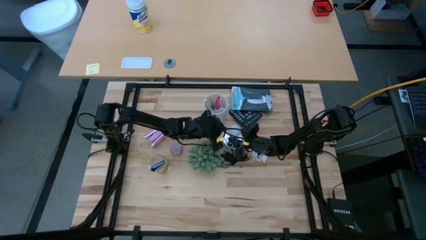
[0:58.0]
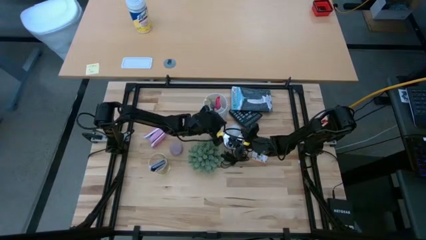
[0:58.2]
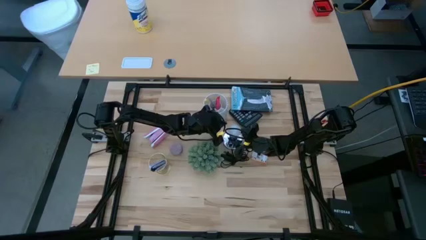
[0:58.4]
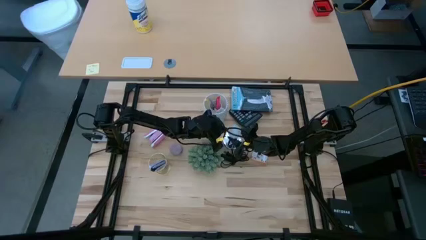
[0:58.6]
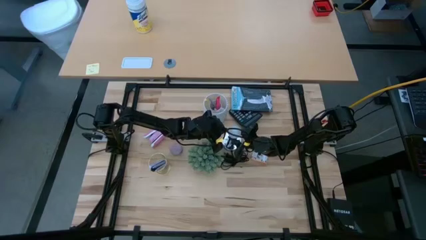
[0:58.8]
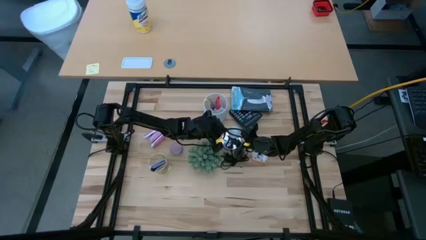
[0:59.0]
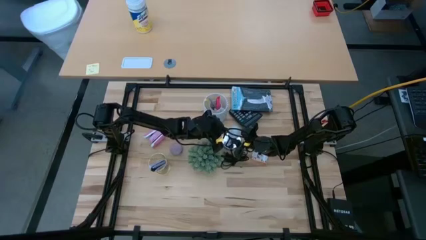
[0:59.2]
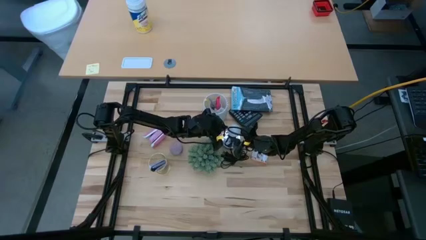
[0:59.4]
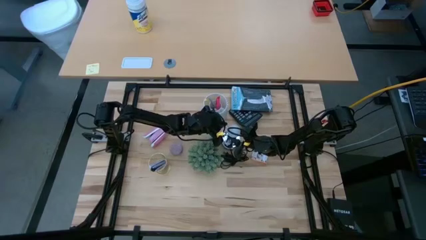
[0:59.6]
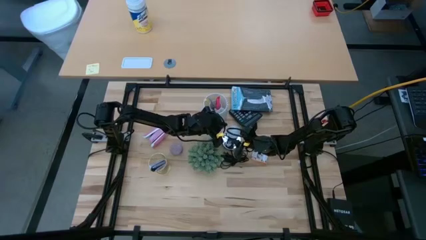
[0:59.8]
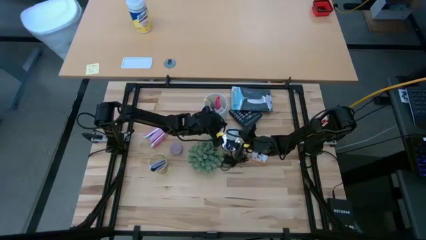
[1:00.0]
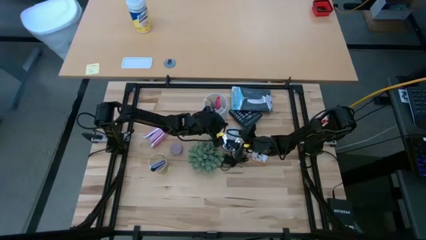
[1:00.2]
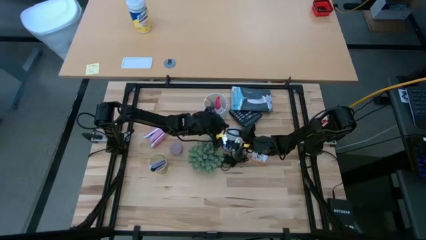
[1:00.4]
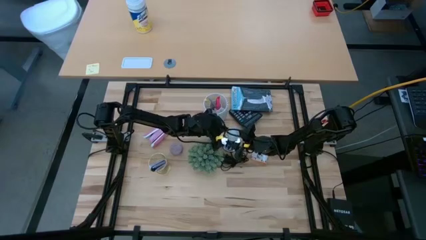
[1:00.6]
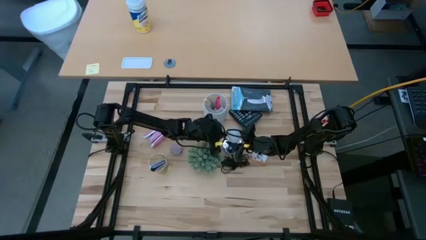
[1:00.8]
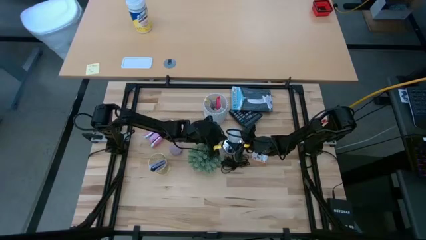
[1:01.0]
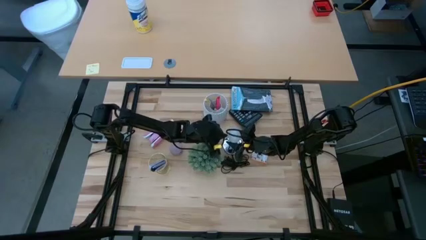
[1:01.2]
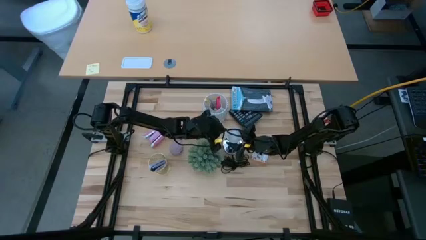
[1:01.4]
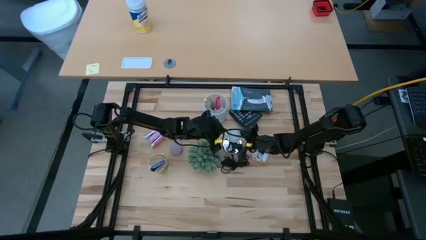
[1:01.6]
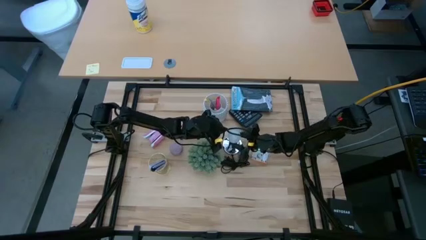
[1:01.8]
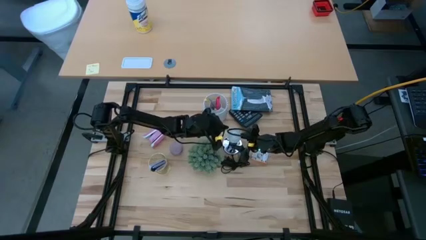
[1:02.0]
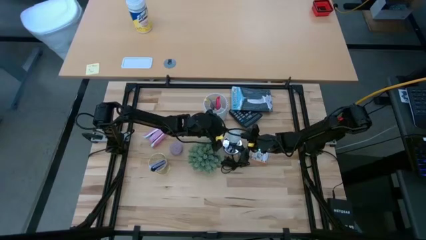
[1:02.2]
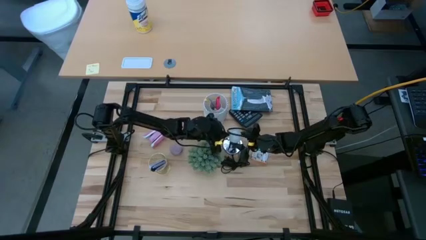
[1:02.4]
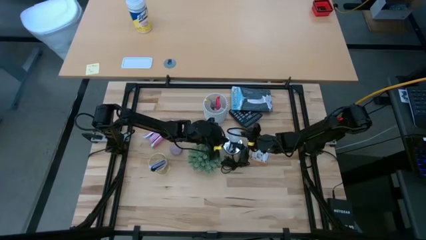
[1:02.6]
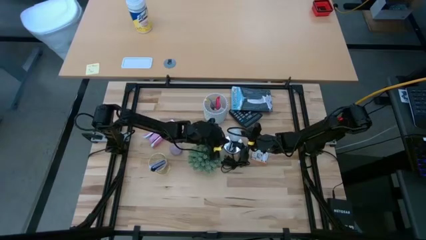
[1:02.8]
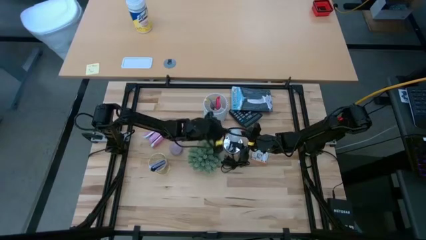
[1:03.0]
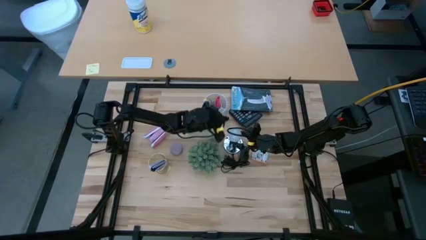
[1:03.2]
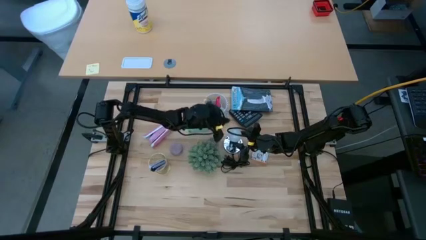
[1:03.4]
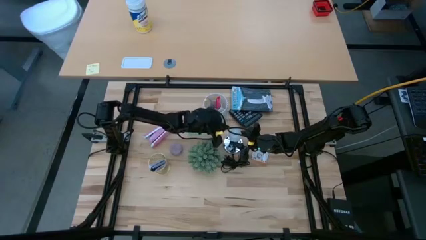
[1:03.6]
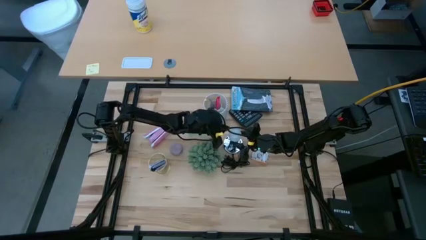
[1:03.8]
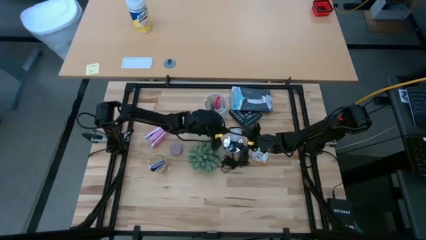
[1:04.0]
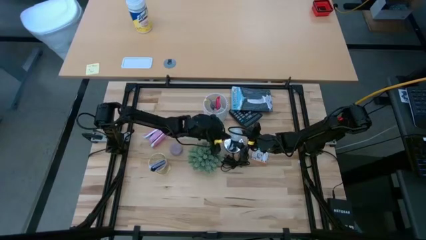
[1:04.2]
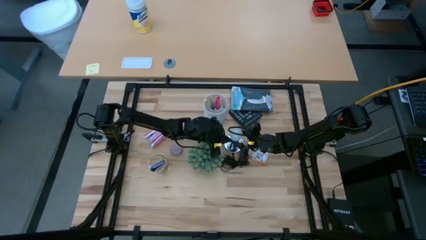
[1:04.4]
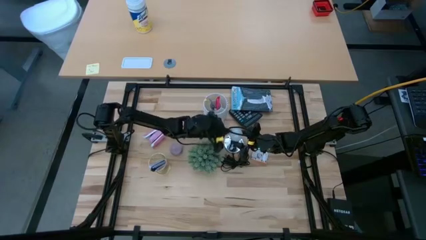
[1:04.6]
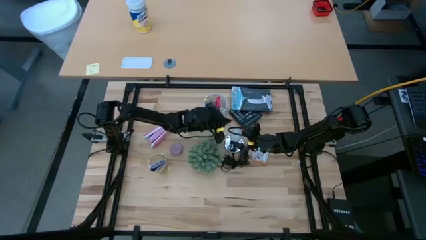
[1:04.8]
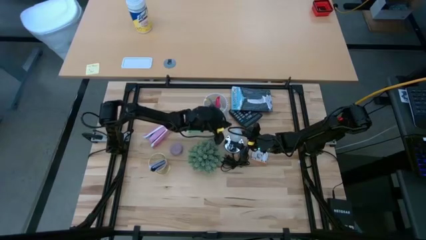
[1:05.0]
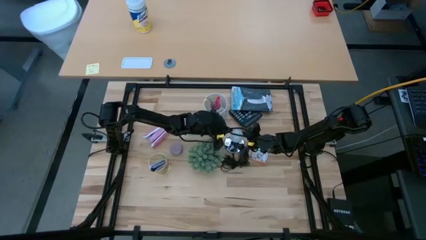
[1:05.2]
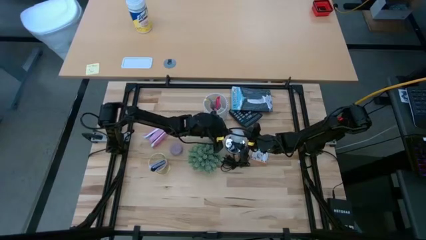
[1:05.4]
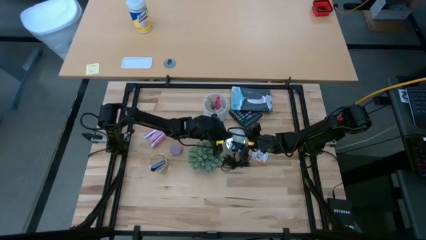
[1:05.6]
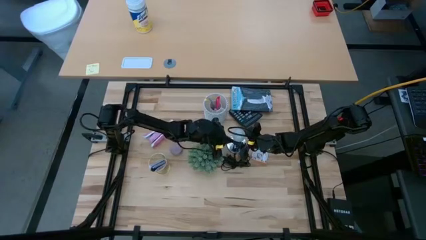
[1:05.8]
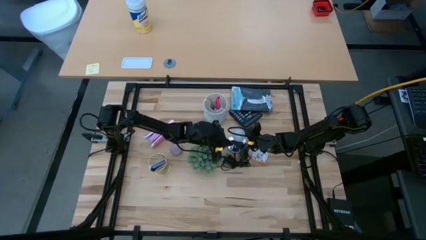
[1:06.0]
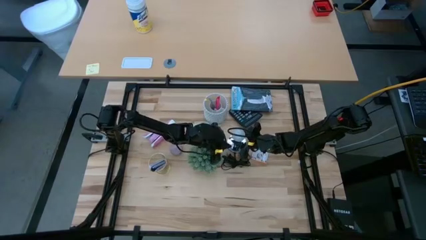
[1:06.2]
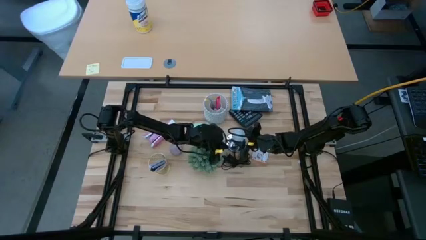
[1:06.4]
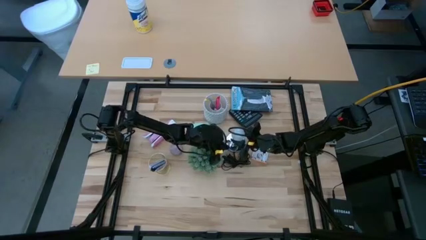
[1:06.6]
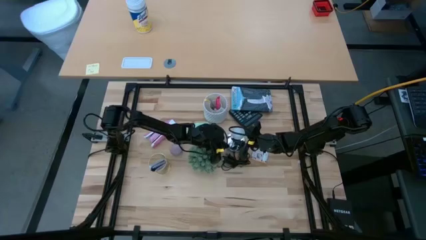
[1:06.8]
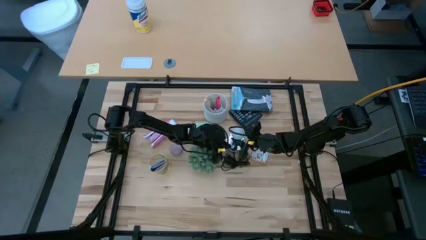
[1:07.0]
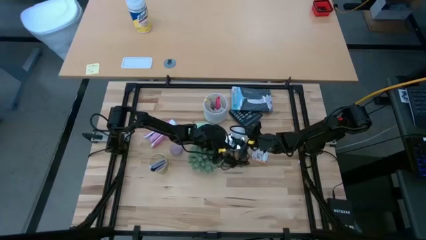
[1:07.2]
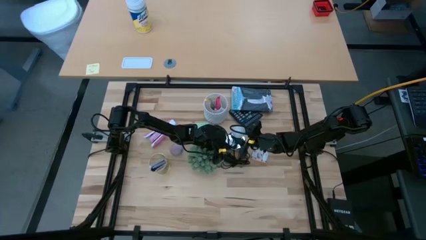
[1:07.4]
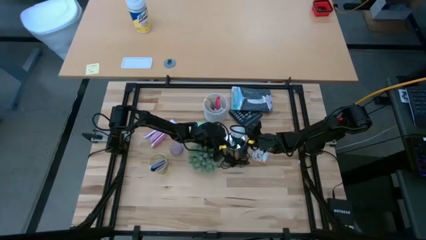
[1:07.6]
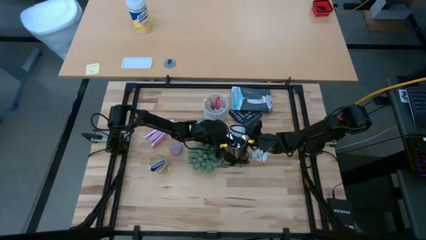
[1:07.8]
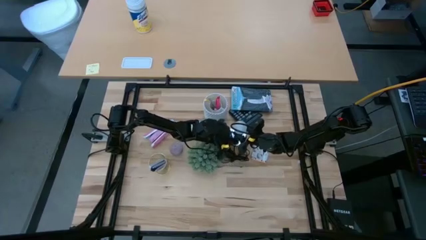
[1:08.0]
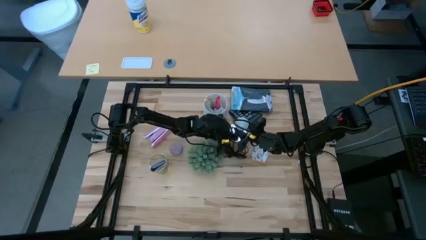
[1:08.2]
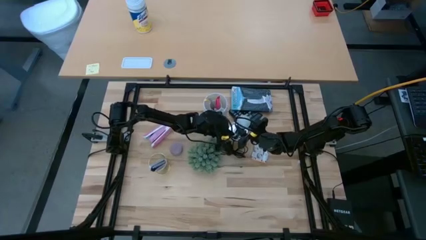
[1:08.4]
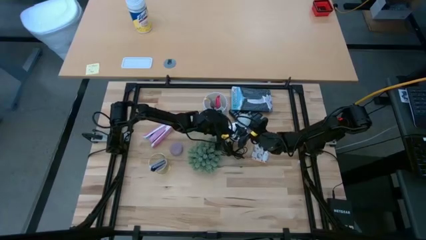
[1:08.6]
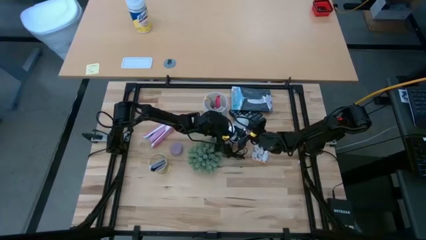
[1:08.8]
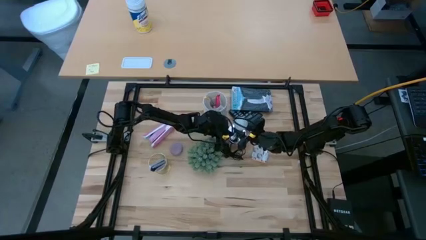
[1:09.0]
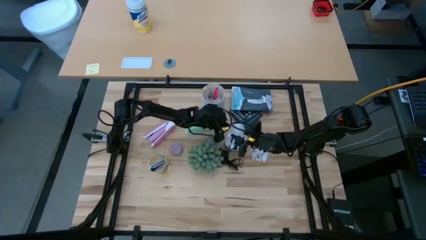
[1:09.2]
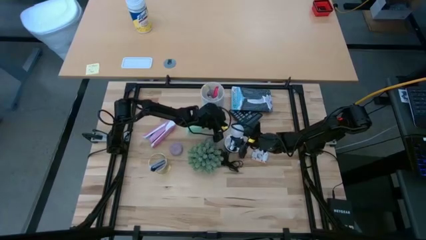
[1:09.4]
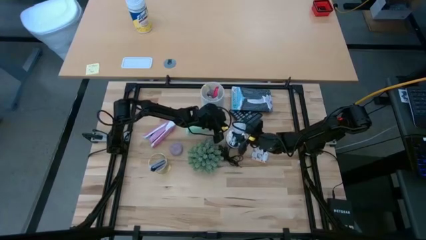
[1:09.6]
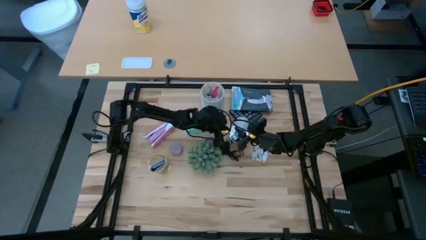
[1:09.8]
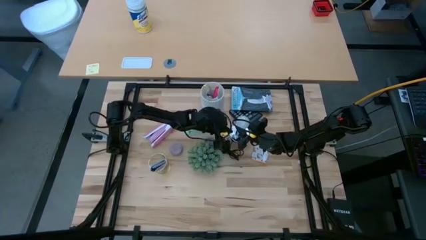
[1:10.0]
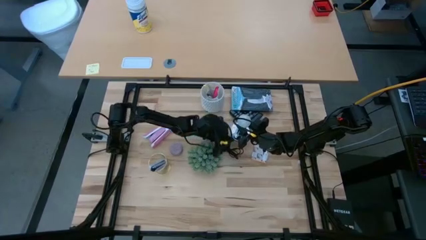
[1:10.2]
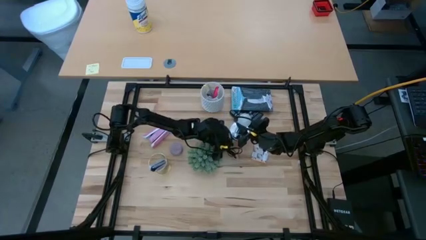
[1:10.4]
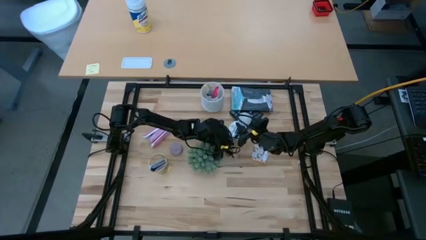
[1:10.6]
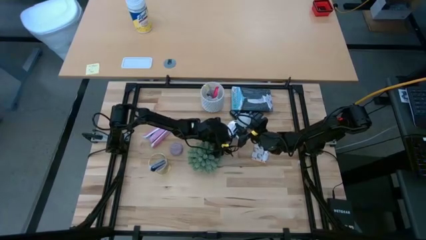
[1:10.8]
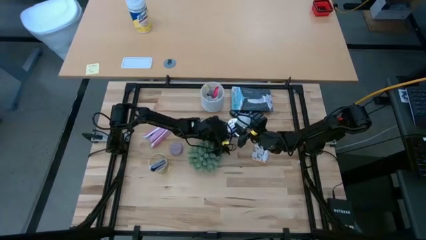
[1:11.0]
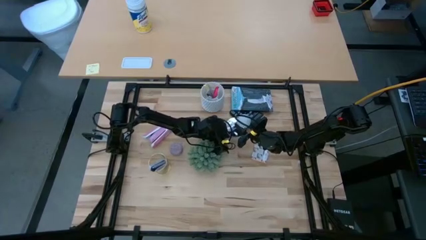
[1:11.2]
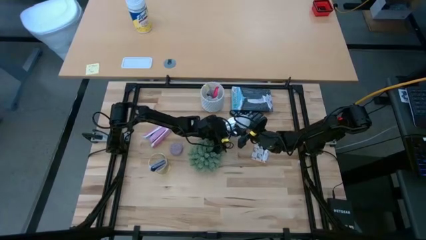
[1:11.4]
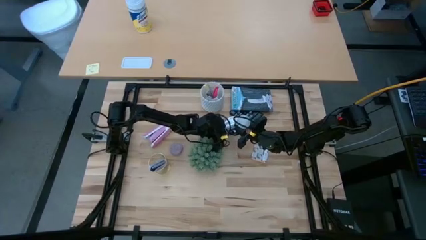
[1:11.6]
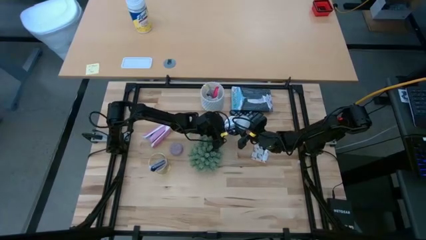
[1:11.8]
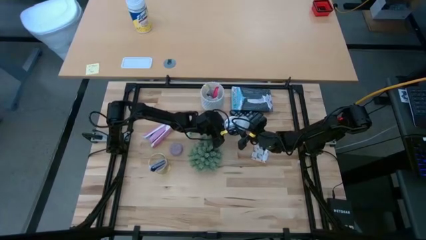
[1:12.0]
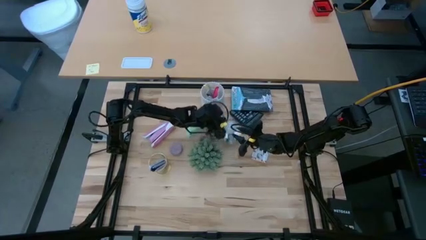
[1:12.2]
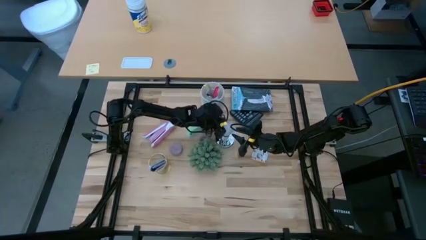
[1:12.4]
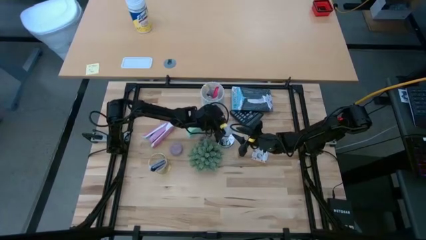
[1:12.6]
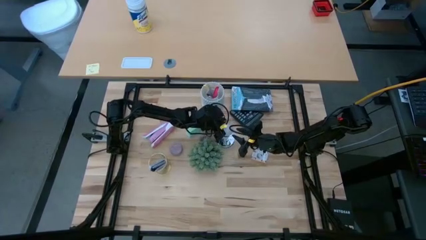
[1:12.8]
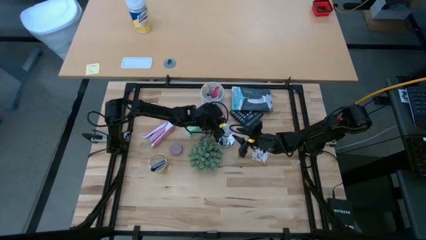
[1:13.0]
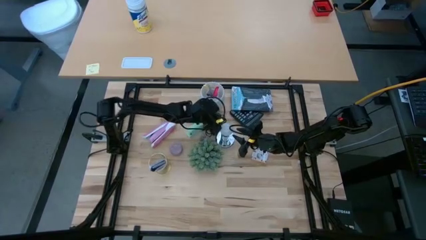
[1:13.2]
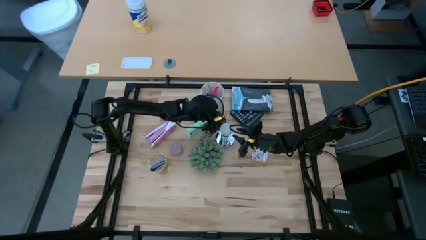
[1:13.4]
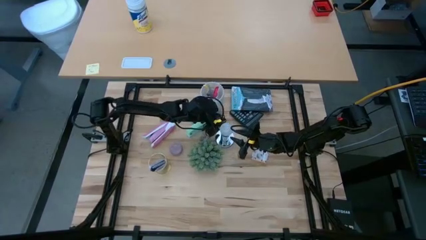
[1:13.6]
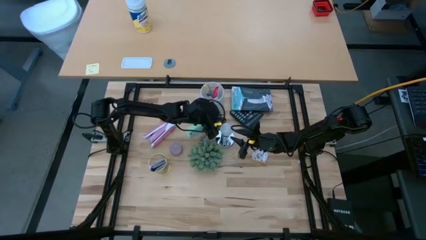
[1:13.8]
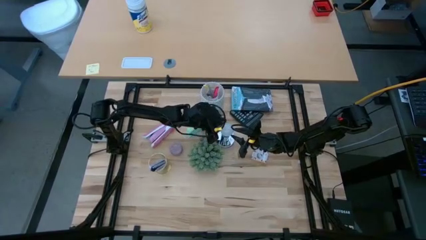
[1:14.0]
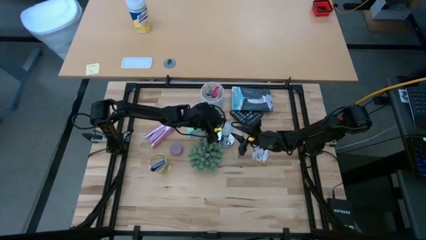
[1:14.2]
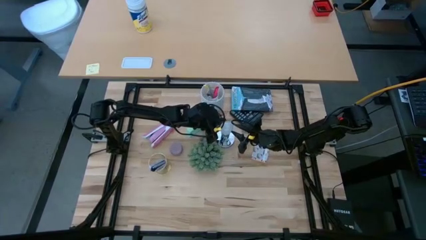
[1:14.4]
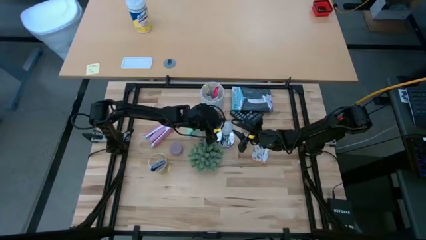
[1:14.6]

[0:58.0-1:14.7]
Task: Screw lightbulb
Remove the lightbulb from the silver desk lamp
